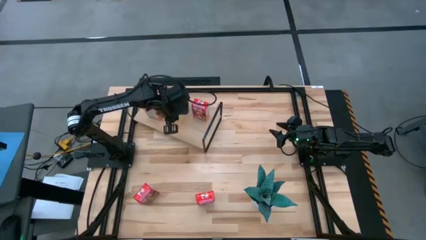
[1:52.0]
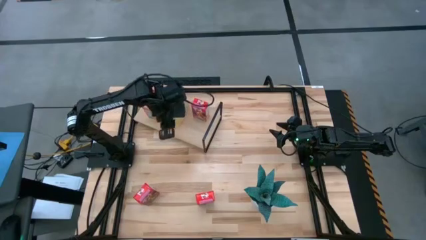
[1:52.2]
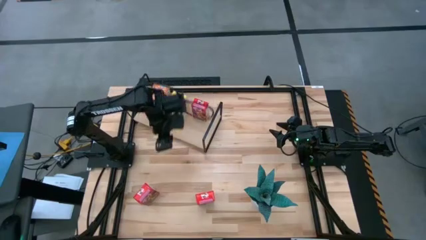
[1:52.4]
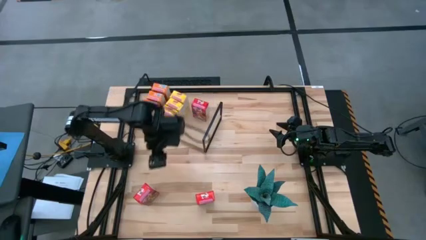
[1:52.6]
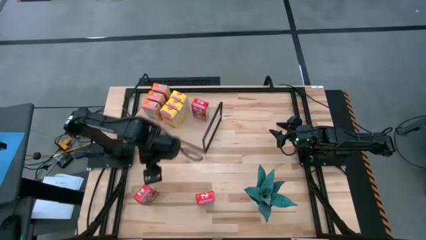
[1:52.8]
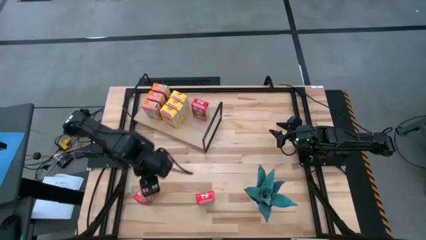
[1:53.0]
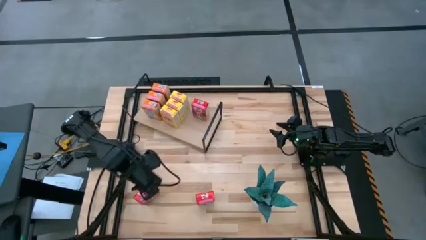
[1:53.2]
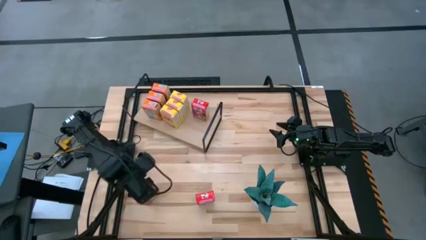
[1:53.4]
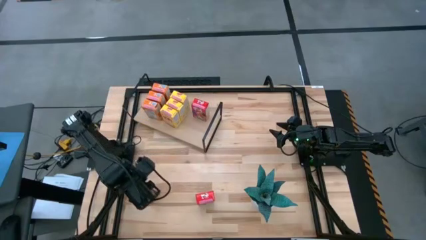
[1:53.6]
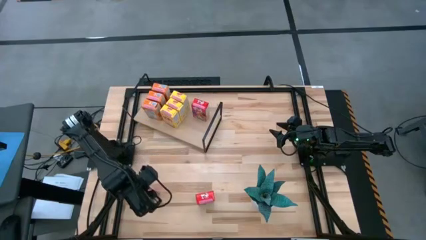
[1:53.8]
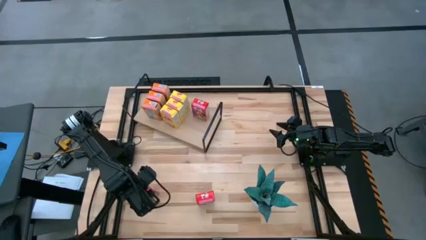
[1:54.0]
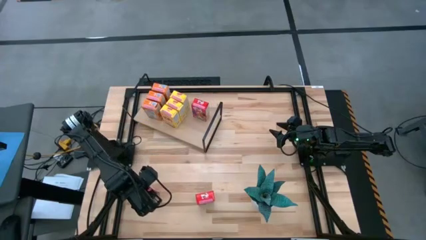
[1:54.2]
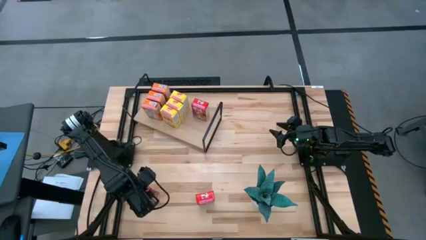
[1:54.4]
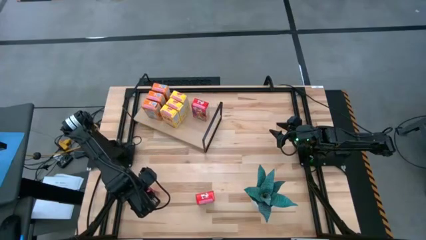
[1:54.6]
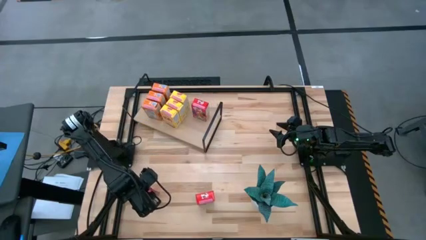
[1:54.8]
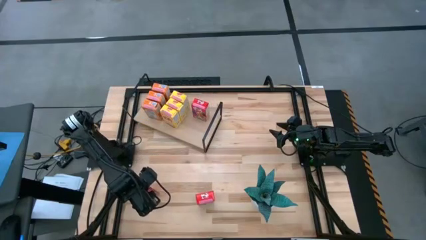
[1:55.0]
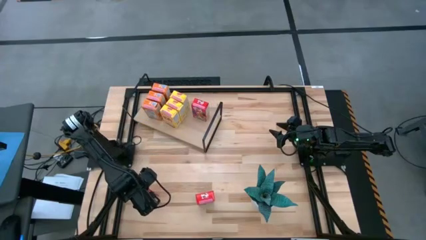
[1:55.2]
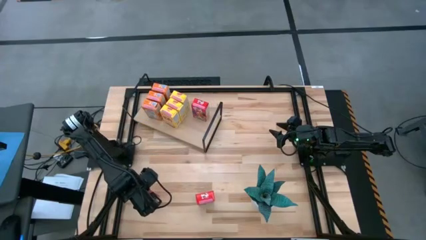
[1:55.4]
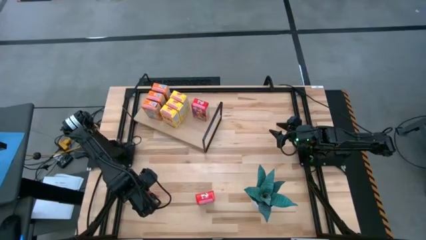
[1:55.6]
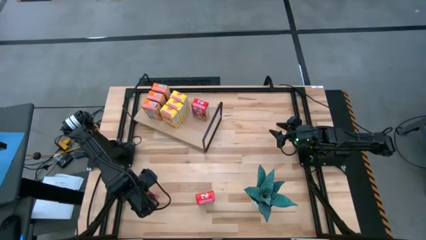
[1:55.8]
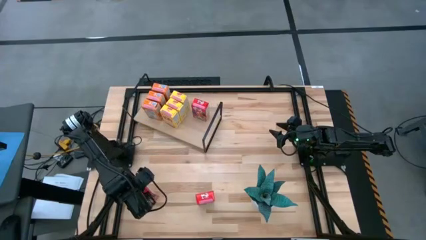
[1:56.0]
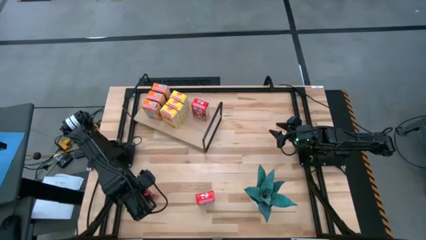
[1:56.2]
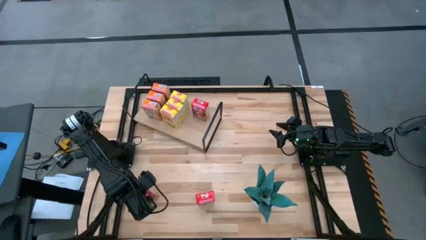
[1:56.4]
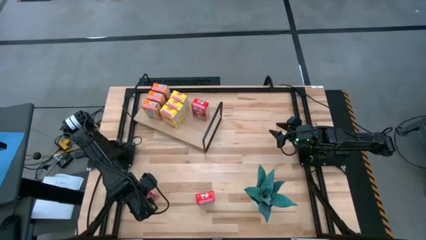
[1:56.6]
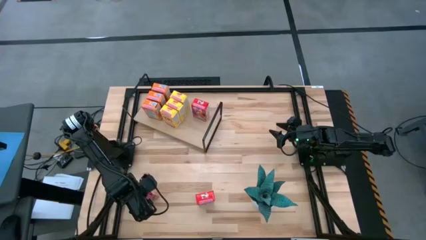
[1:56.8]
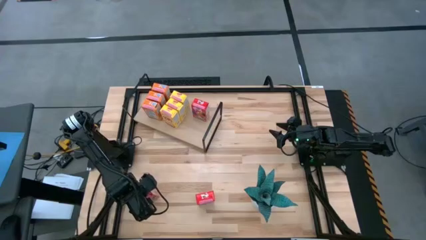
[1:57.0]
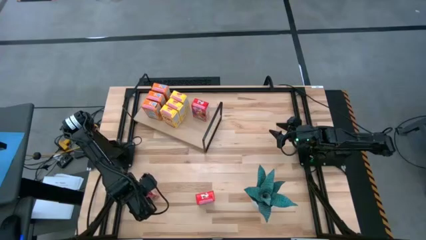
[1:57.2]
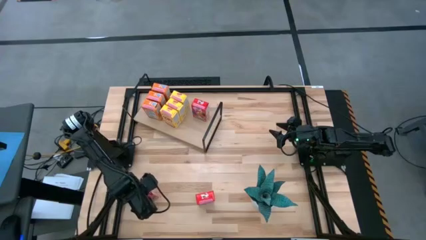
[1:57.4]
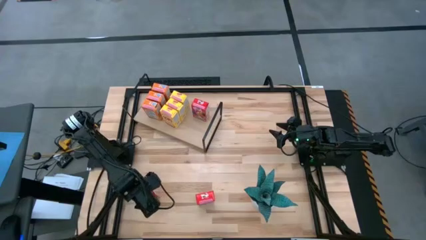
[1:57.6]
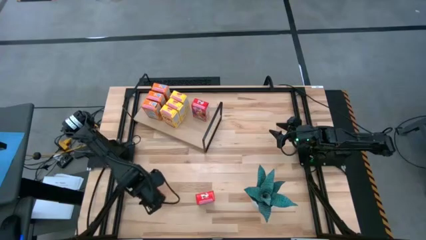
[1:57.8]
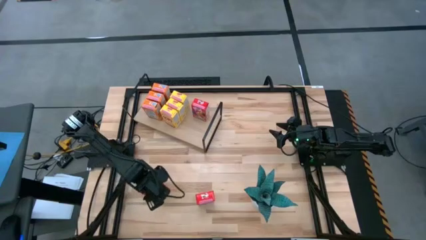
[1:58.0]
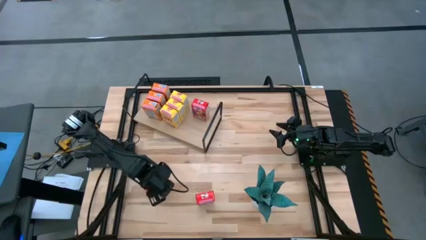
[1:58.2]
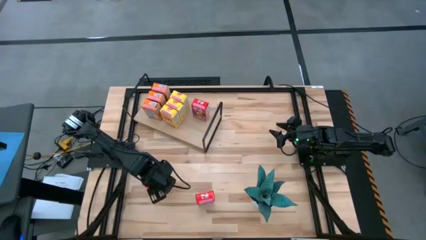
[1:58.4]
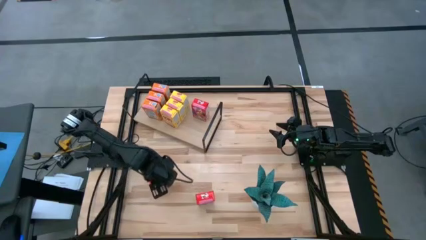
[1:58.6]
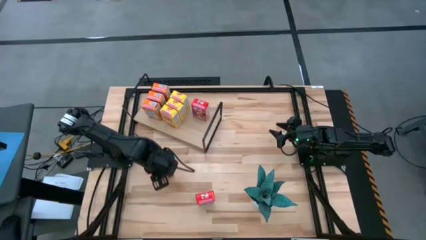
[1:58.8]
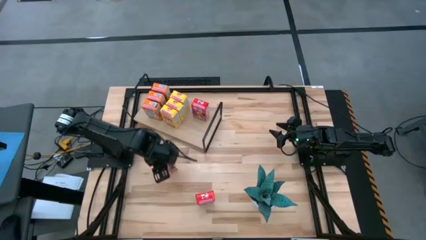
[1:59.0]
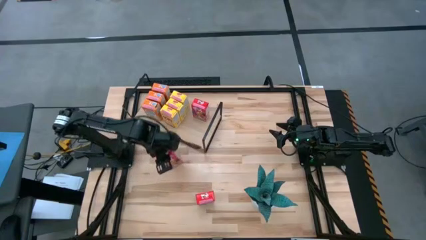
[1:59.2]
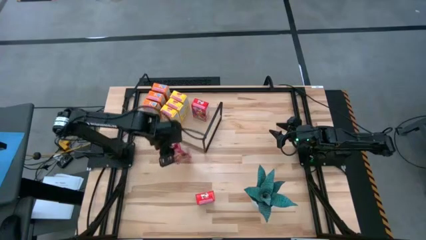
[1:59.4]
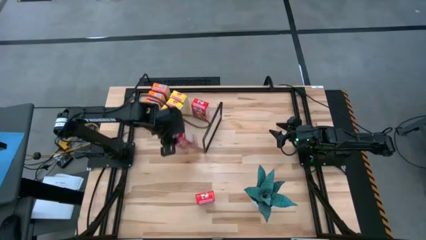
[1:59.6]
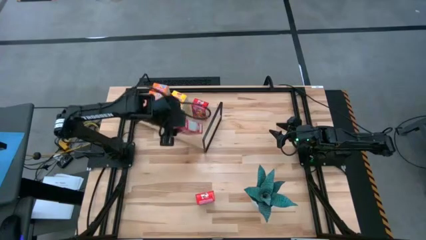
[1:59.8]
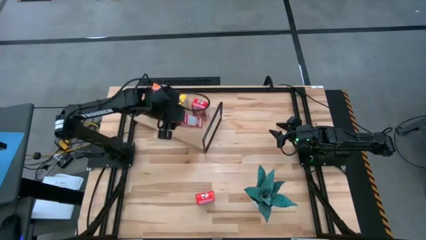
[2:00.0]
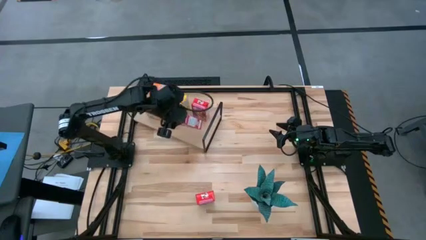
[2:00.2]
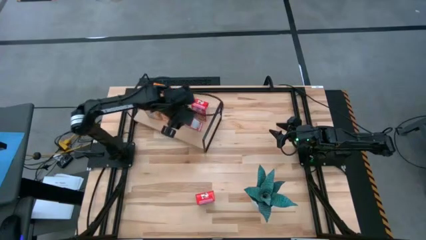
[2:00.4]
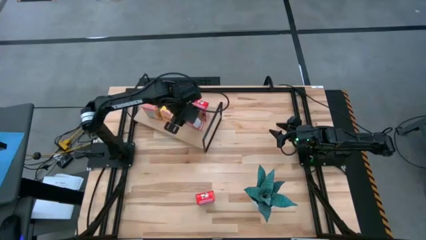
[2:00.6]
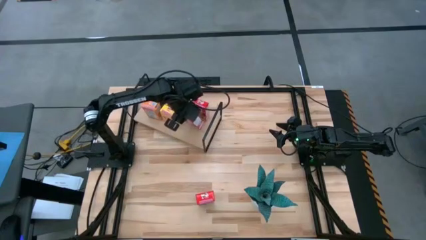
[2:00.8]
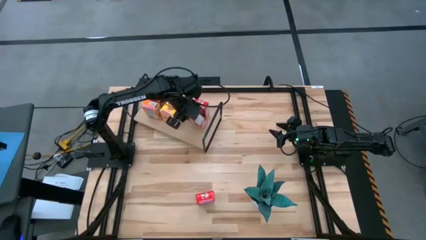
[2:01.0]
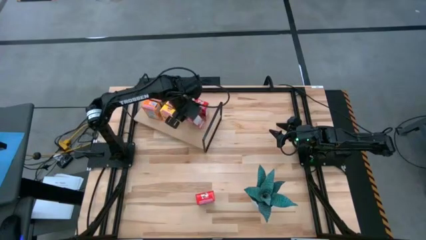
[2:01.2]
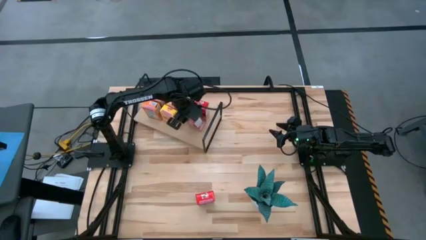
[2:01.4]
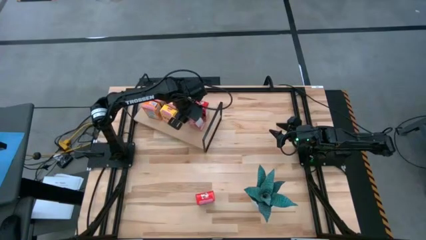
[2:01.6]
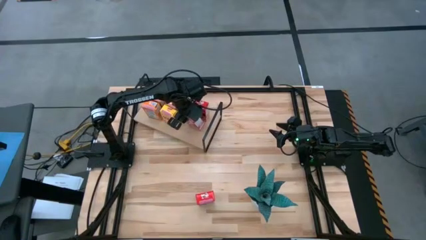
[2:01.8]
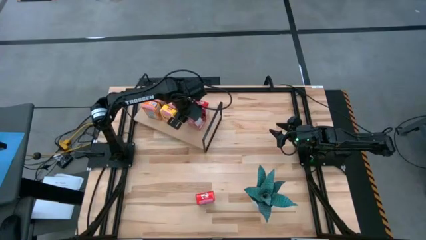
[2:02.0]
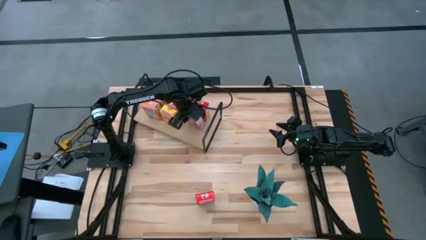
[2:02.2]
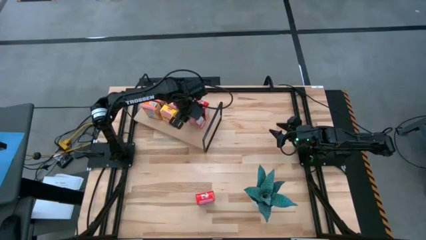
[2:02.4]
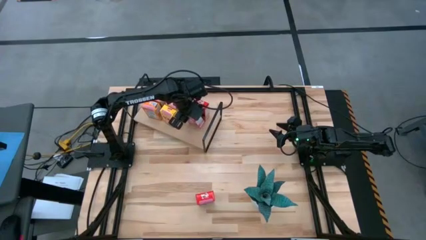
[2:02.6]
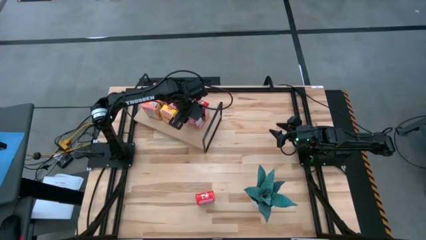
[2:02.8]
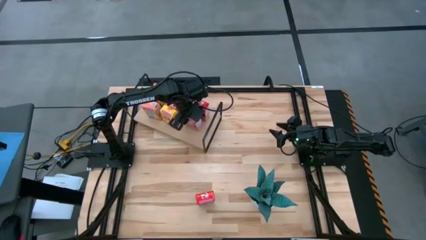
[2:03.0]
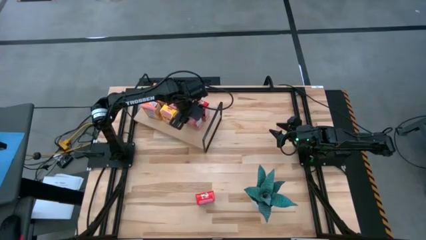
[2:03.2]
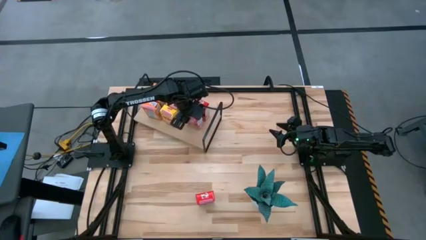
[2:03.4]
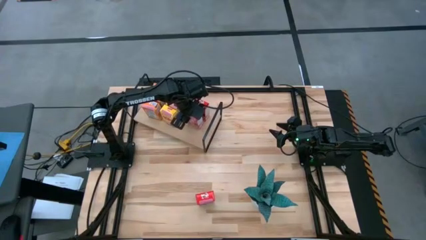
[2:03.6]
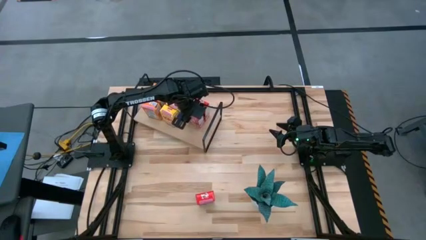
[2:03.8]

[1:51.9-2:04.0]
Task: Stack cereal on shelf
Put the left red cereal box aligned with the other red cereal box on the shelf
